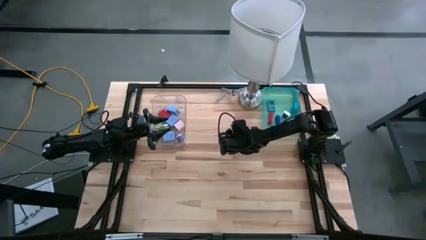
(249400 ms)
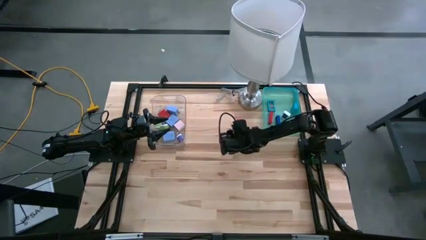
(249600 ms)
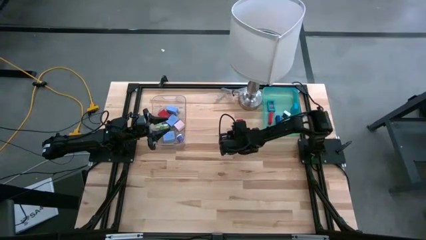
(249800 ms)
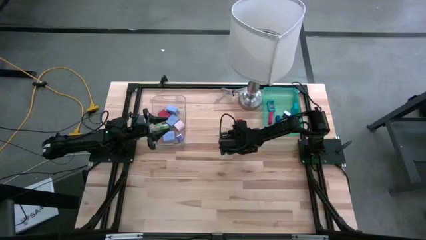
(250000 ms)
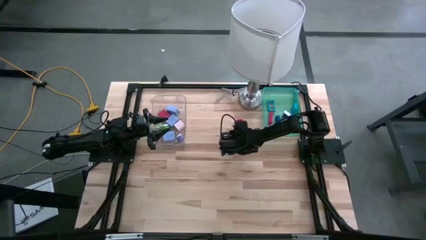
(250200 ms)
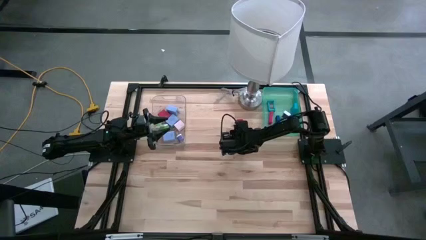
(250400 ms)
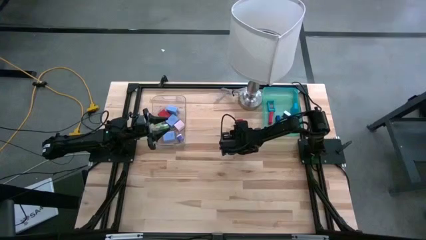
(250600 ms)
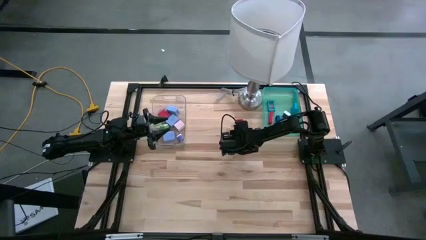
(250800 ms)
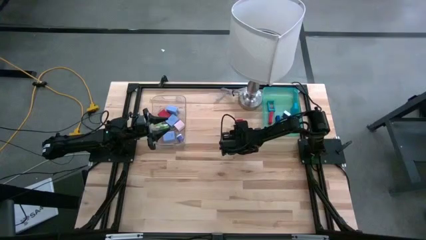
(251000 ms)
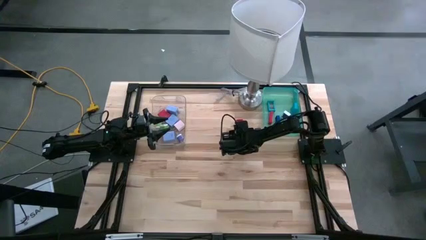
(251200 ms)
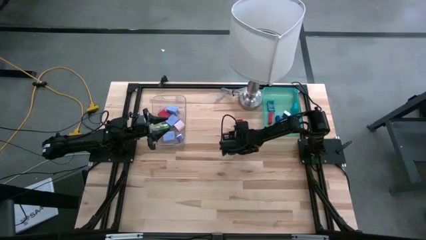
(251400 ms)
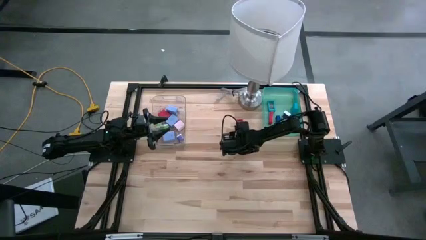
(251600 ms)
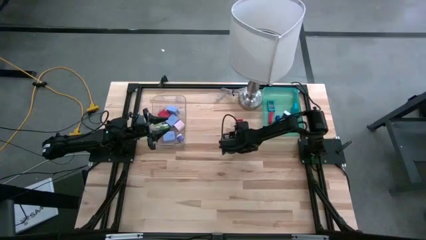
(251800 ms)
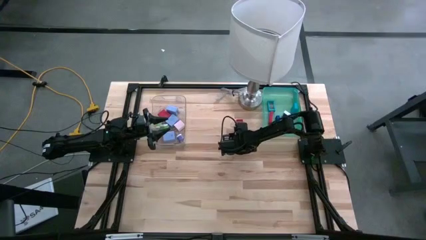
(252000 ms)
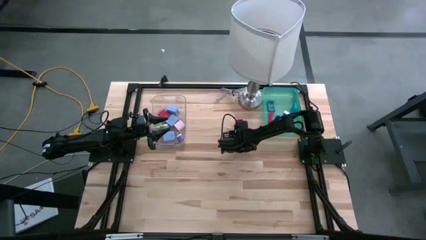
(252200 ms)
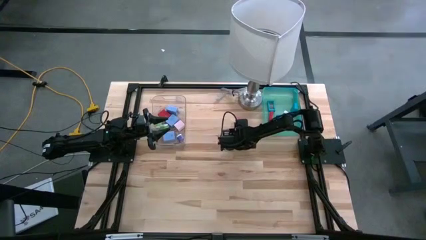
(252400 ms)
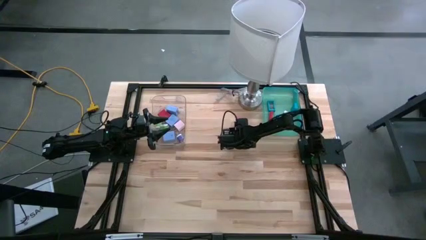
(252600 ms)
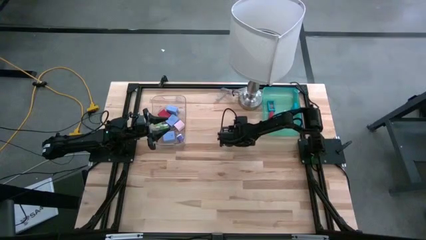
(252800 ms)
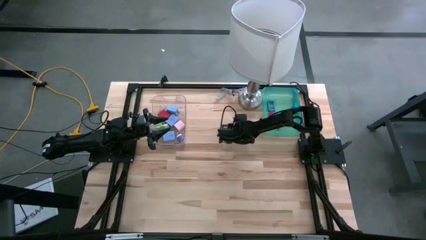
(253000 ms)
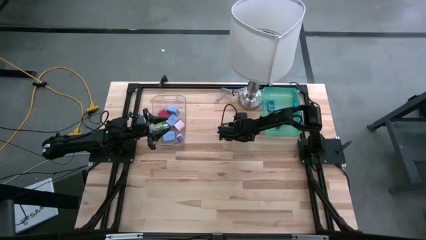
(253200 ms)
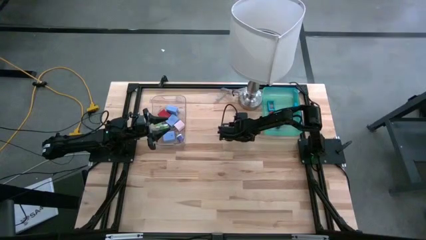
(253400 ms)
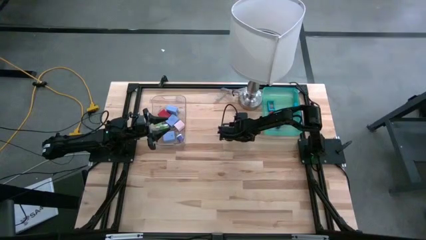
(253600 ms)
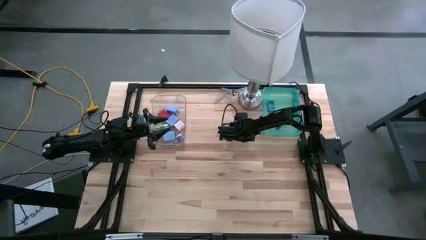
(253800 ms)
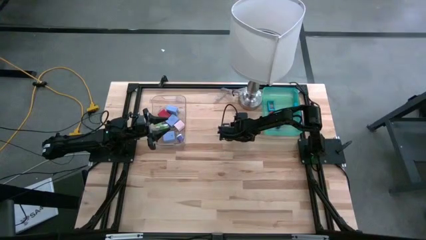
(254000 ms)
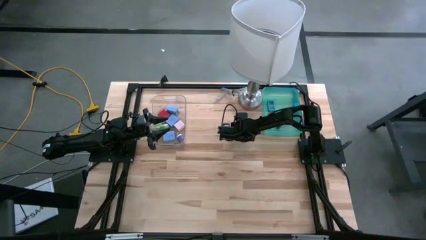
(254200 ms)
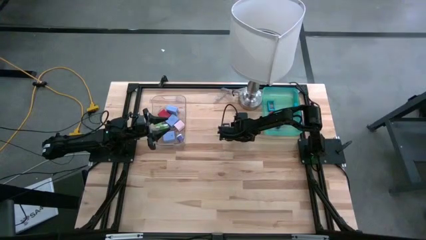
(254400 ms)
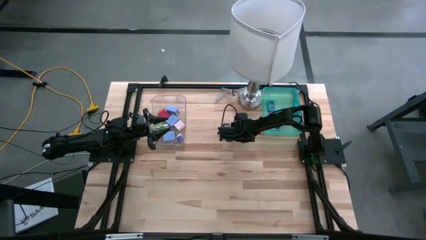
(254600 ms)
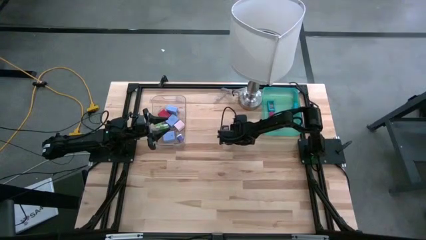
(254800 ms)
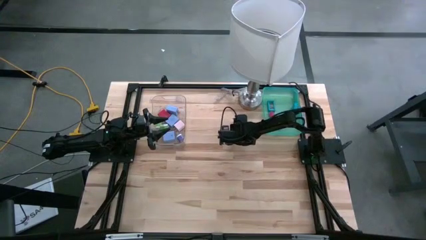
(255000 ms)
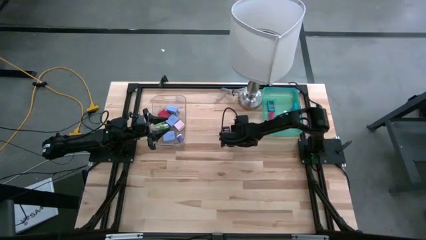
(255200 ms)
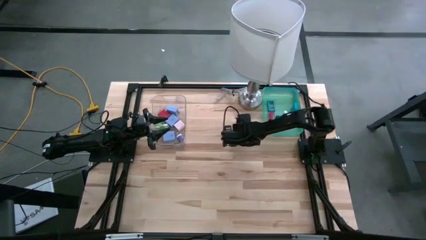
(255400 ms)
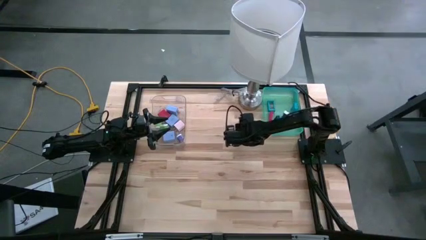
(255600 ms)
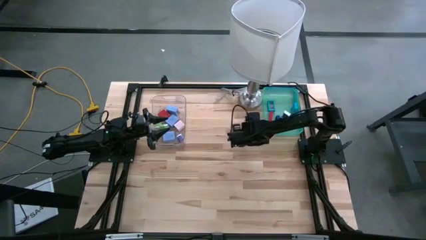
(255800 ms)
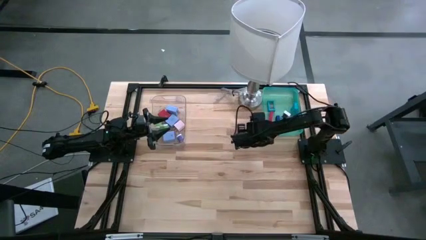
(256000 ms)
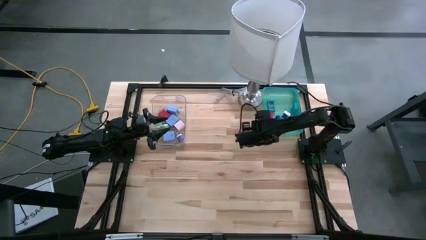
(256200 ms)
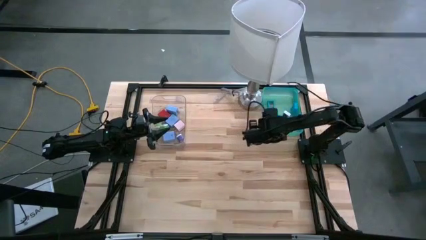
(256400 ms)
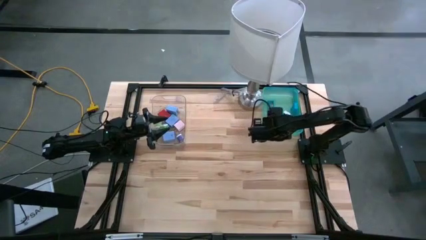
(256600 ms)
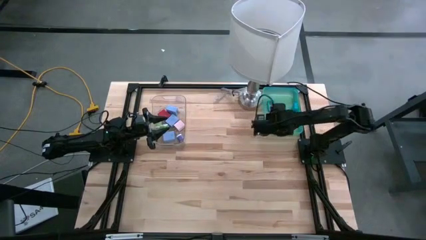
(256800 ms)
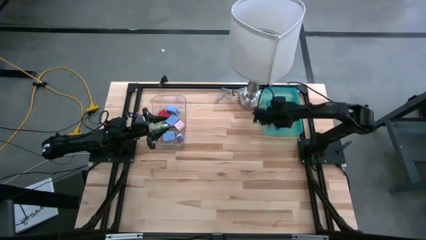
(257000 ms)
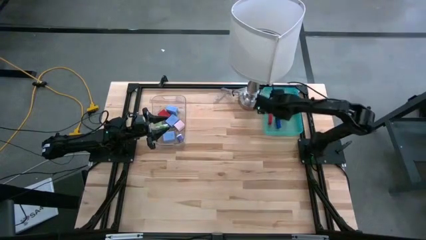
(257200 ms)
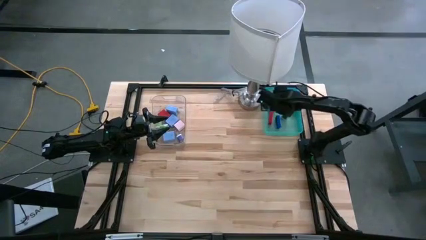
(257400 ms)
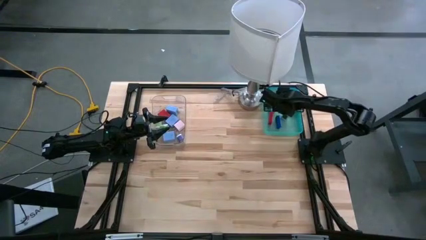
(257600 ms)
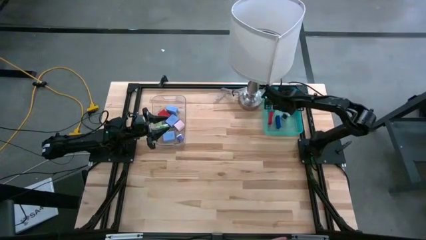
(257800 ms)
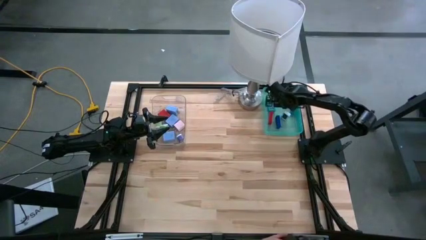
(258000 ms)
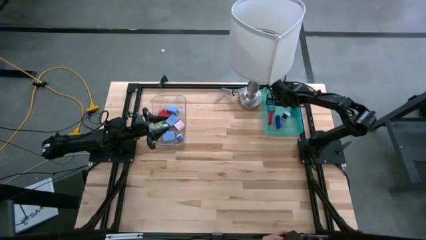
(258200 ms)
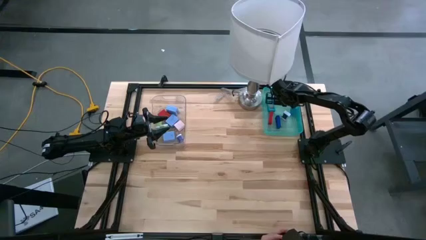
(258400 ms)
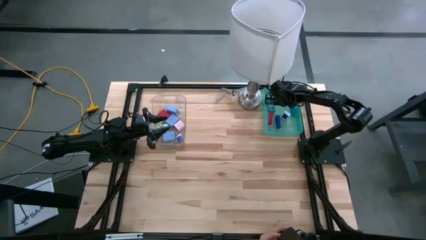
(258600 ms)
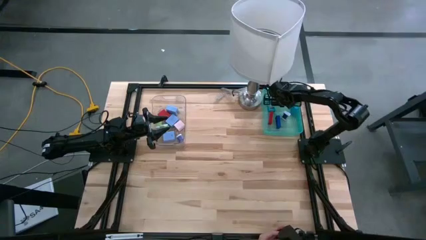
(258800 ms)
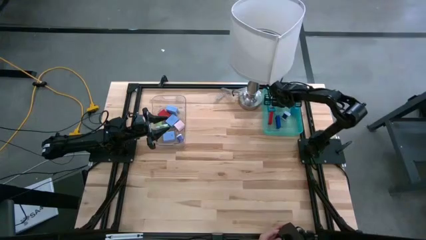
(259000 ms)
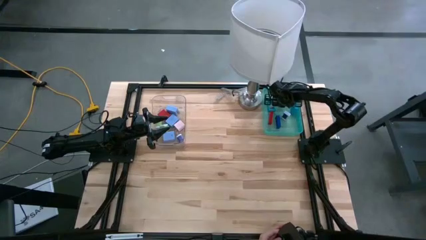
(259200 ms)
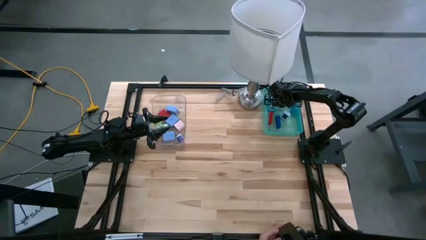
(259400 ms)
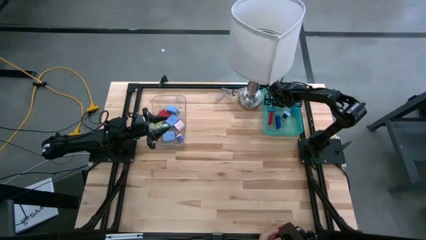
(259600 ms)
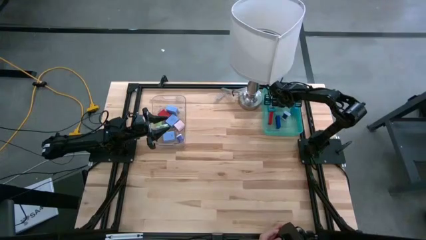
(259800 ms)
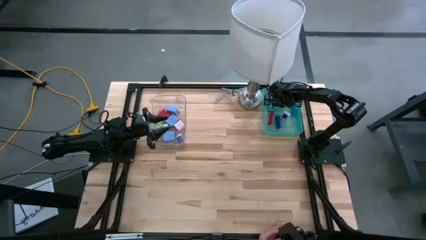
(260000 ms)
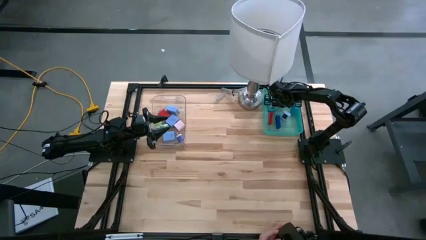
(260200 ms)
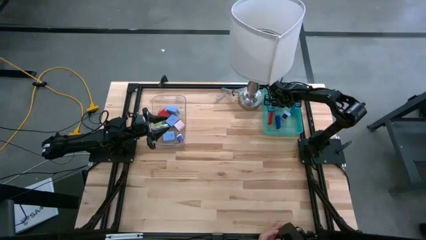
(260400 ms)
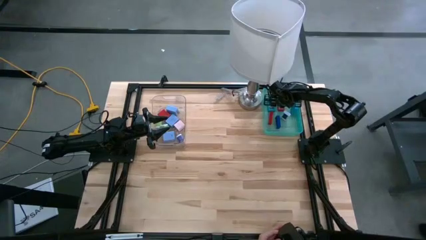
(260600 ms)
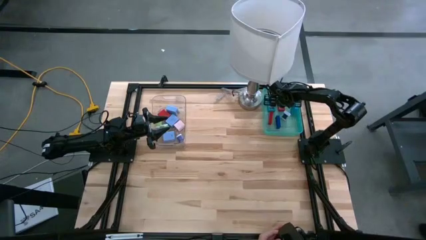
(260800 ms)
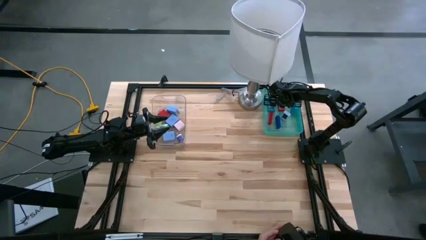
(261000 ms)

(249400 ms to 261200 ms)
Task: Pick & Place Office items
Put the red mini digital clock into the light blue bin

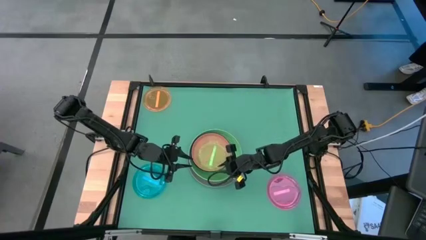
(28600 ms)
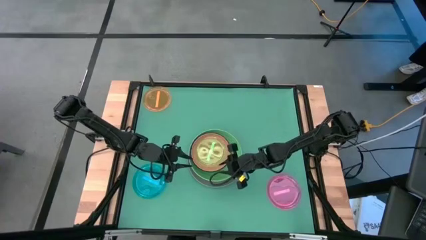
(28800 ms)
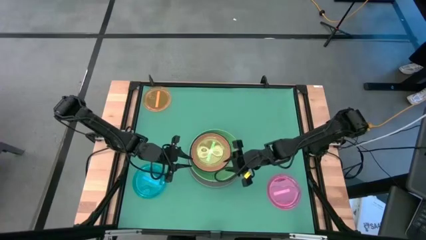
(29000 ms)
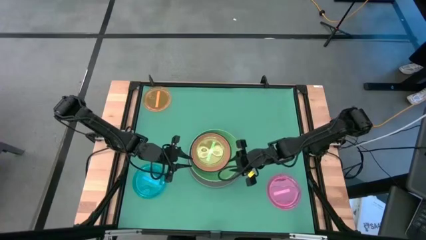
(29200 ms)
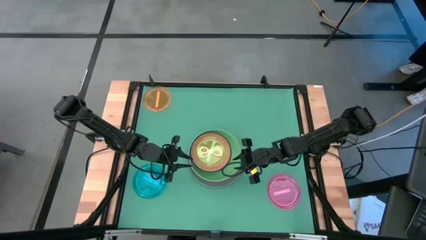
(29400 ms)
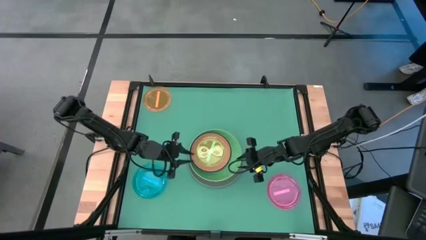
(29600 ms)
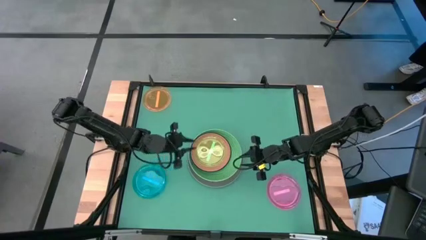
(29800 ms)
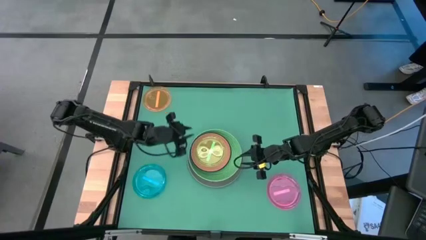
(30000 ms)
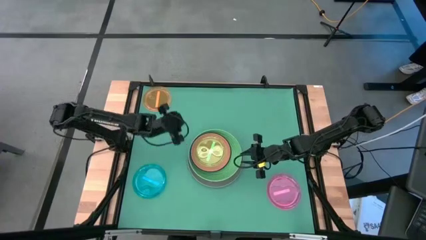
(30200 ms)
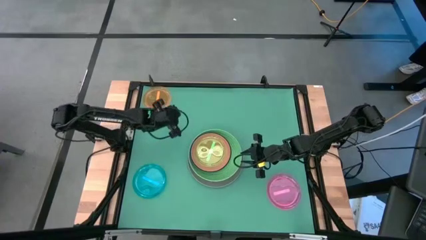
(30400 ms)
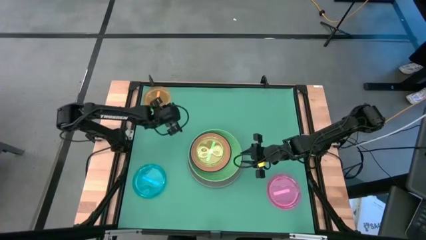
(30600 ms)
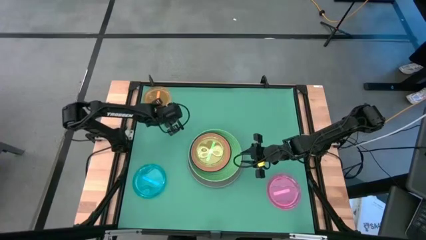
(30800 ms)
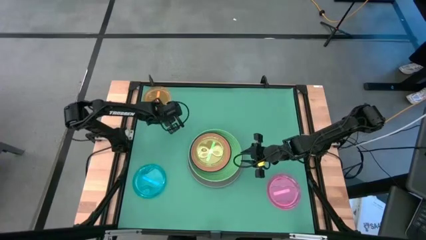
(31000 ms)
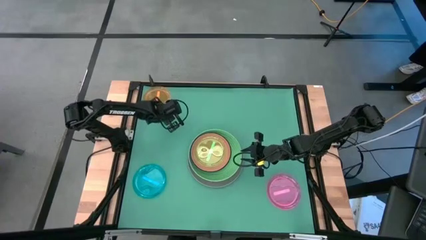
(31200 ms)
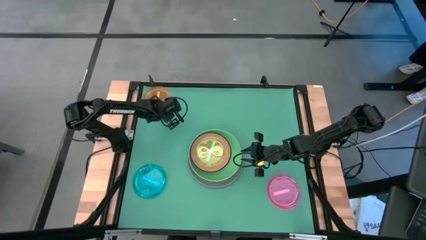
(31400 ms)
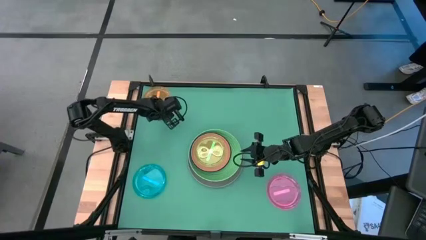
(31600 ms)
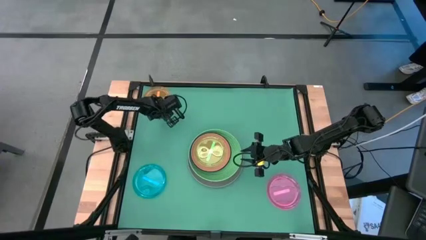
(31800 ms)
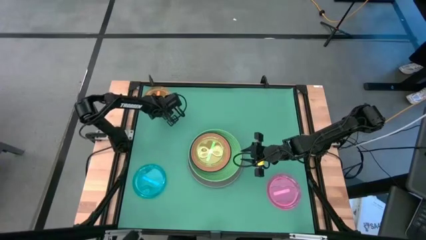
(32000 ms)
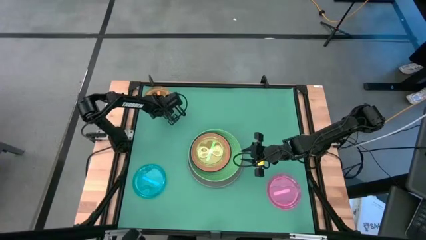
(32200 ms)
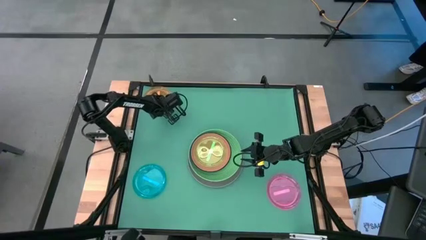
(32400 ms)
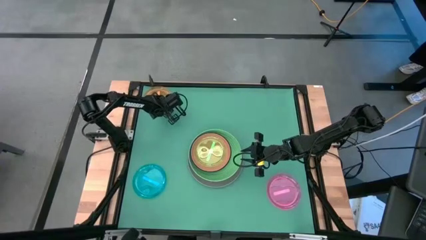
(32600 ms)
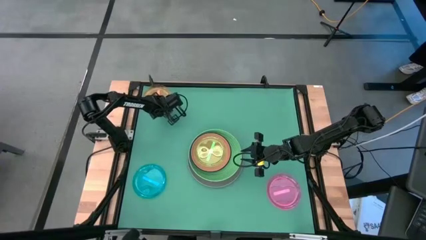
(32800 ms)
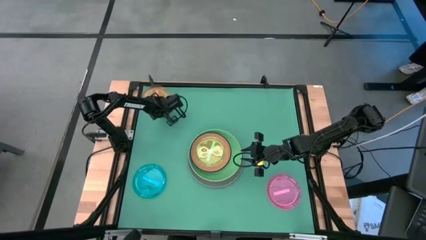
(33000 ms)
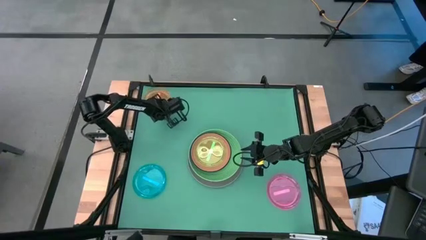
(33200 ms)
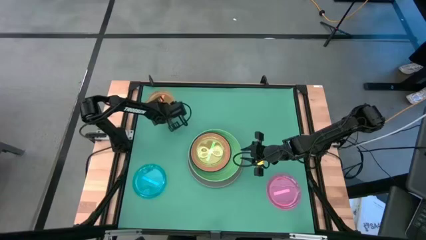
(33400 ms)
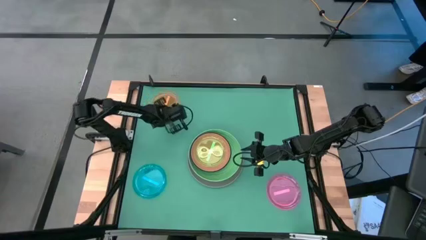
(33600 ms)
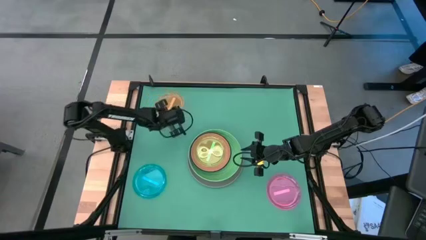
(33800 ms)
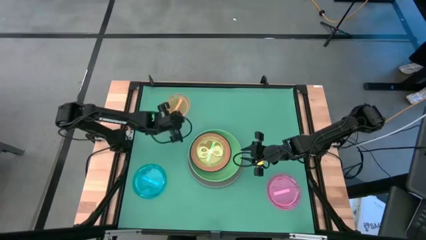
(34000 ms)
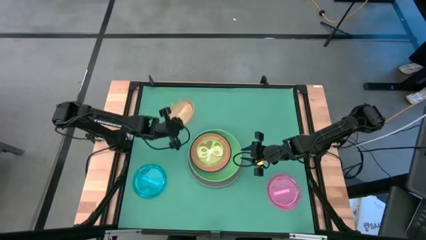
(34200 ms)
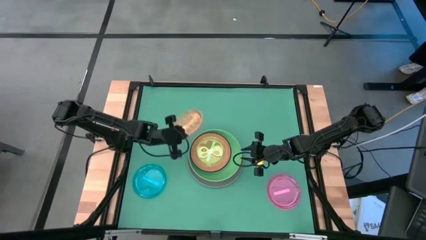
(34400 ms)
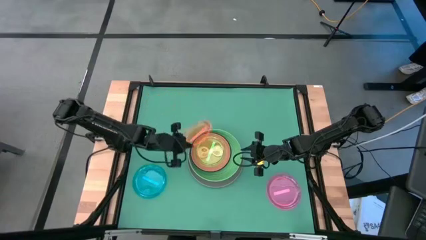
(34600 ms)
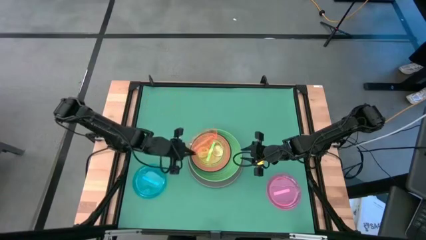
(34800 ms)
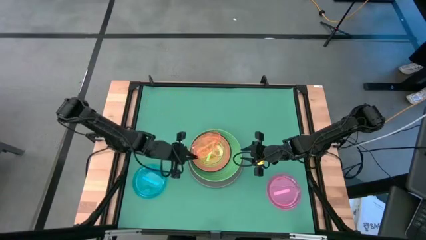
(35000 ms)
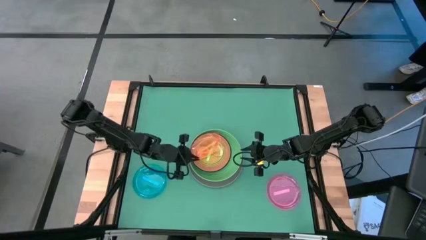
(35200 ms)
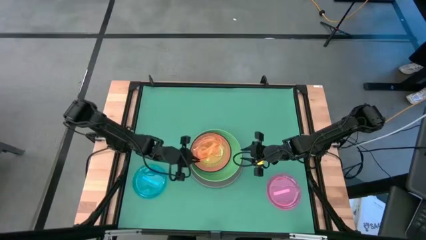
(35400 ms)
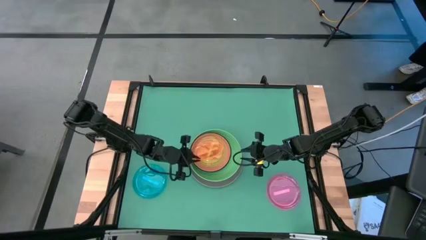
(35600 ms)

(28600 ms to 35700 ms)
Task: Stack plastic plates
Stack the light orange plate on the light green plate
